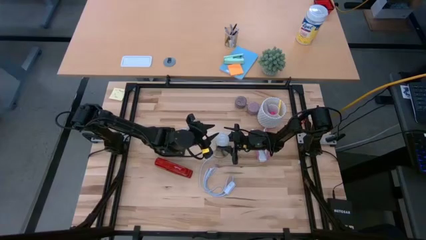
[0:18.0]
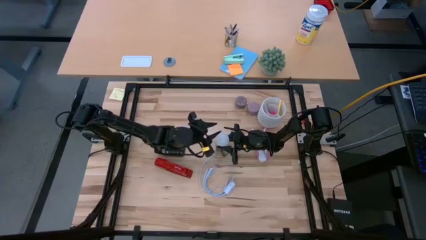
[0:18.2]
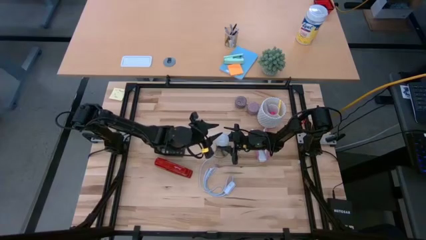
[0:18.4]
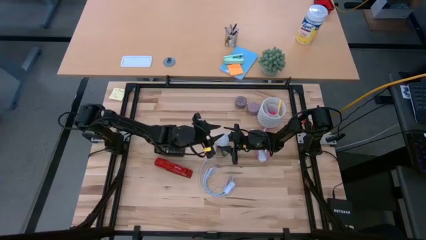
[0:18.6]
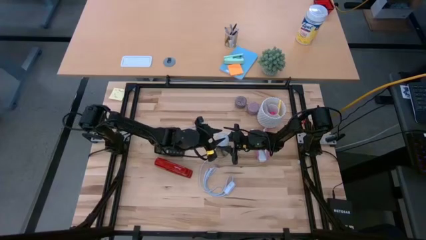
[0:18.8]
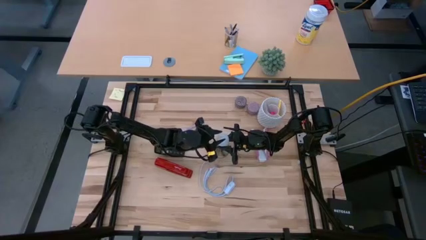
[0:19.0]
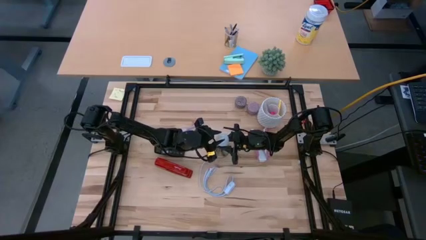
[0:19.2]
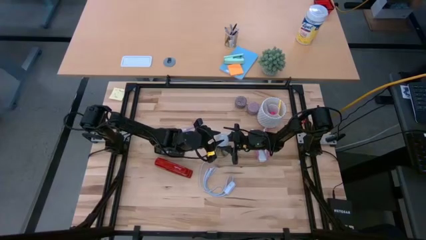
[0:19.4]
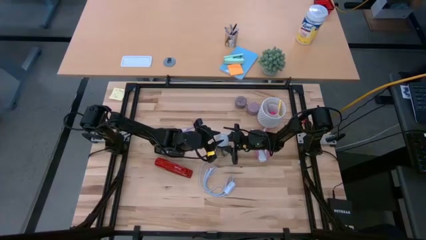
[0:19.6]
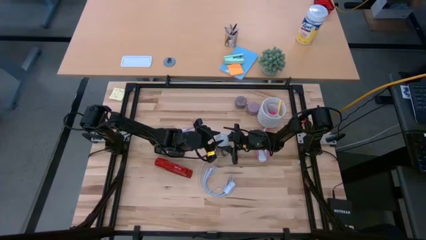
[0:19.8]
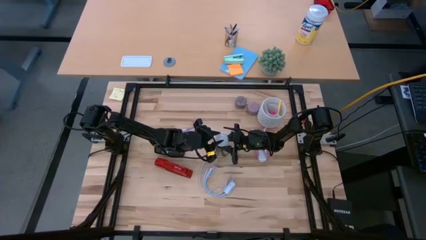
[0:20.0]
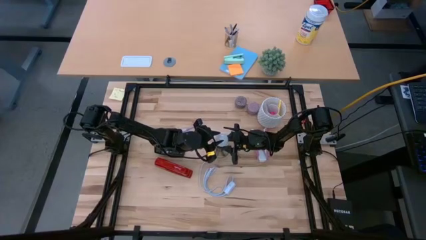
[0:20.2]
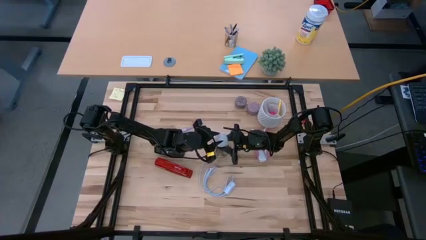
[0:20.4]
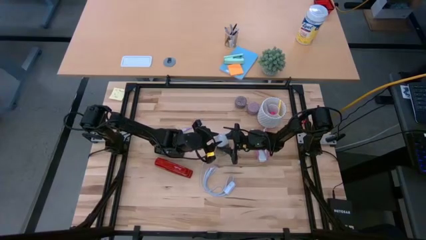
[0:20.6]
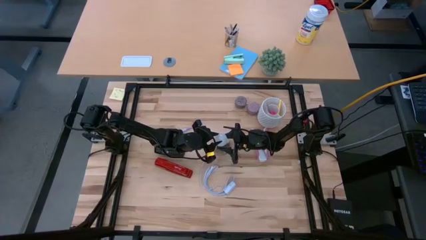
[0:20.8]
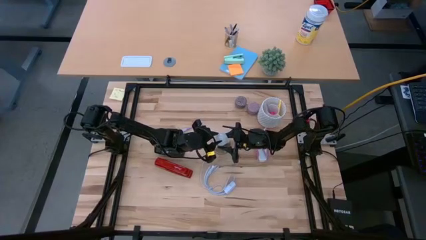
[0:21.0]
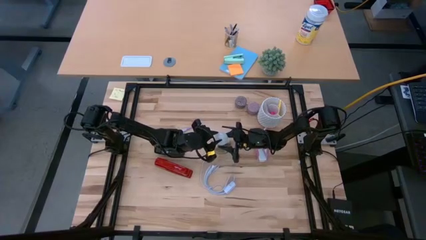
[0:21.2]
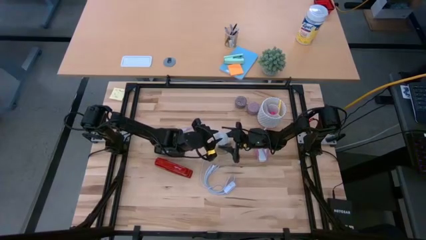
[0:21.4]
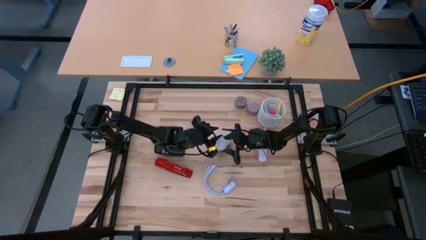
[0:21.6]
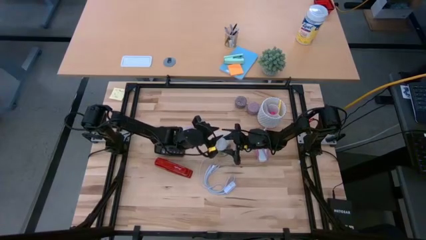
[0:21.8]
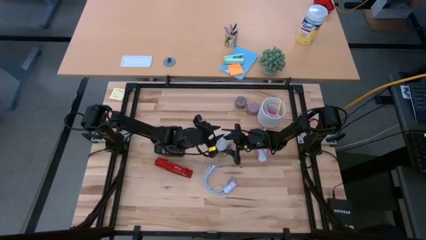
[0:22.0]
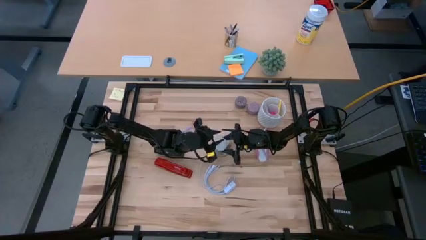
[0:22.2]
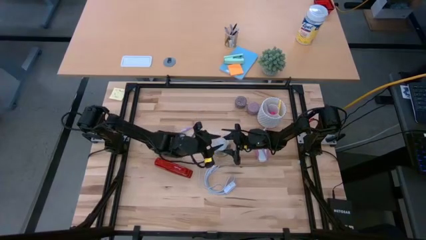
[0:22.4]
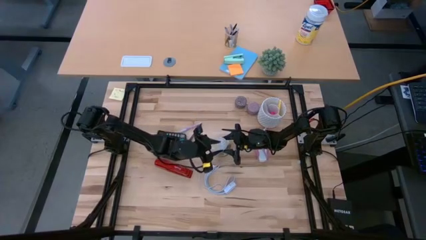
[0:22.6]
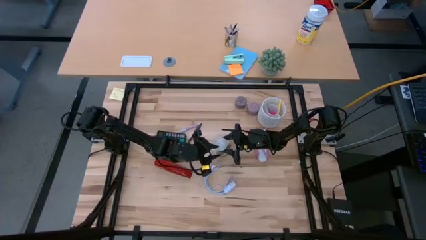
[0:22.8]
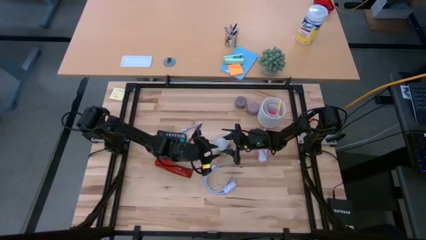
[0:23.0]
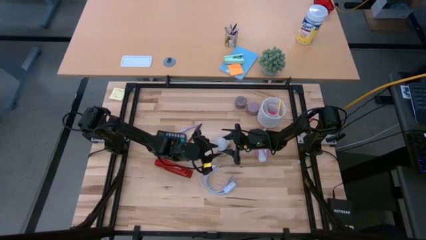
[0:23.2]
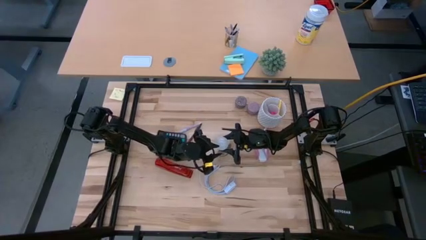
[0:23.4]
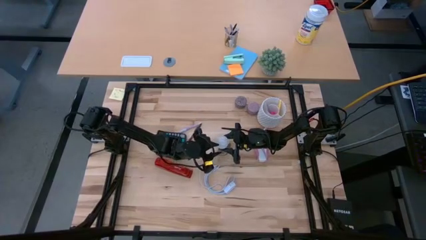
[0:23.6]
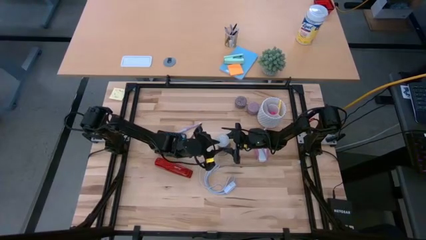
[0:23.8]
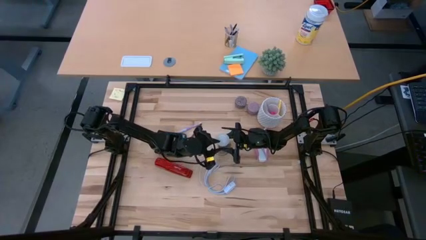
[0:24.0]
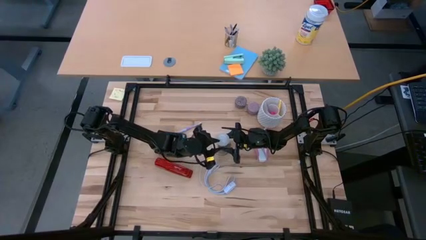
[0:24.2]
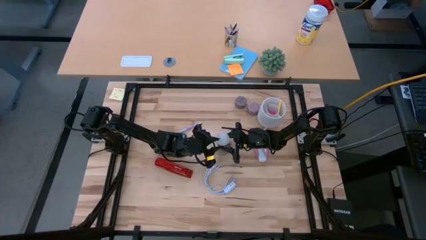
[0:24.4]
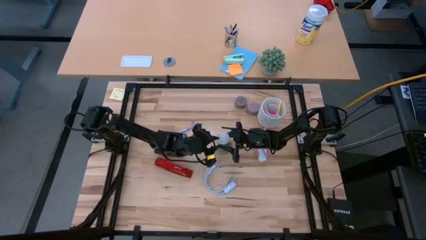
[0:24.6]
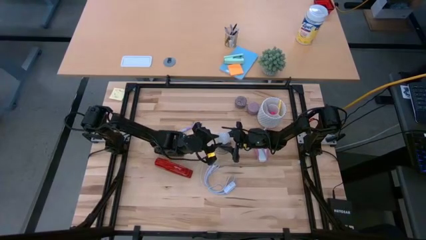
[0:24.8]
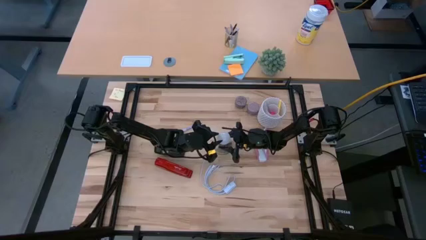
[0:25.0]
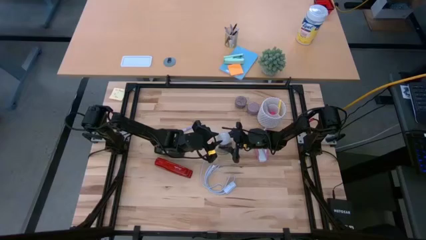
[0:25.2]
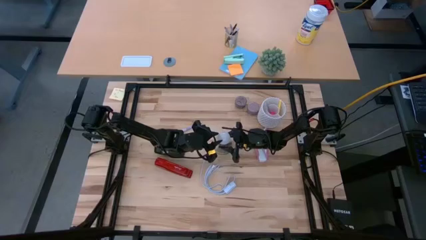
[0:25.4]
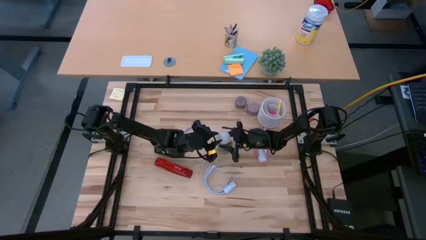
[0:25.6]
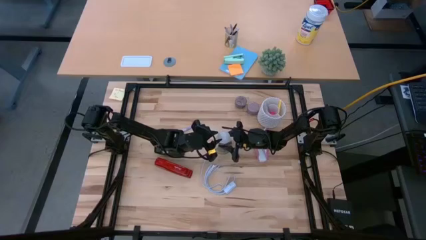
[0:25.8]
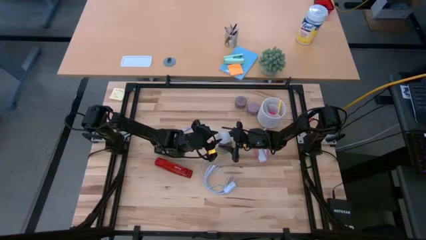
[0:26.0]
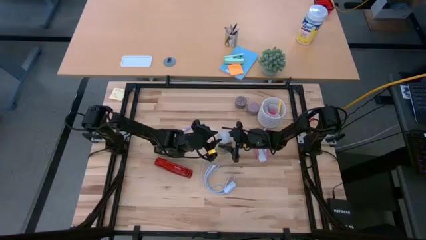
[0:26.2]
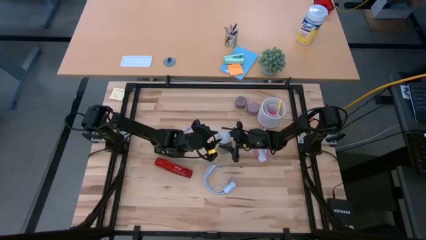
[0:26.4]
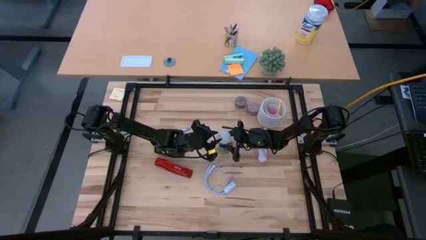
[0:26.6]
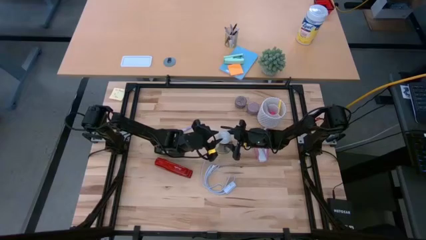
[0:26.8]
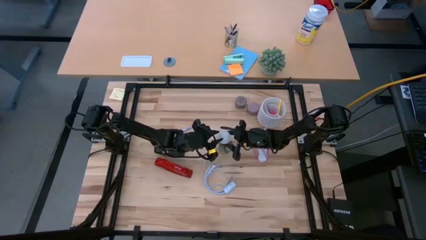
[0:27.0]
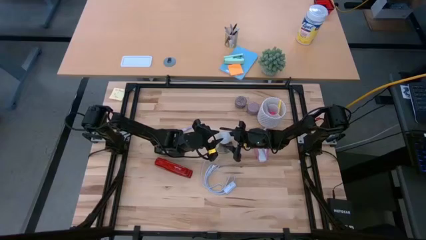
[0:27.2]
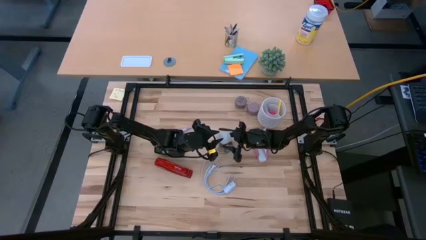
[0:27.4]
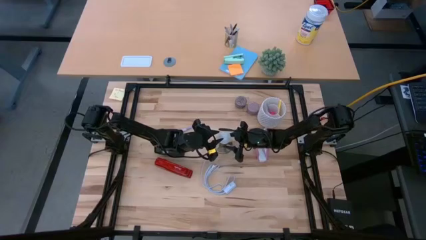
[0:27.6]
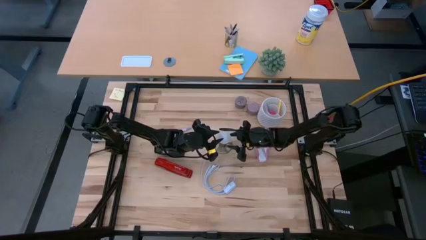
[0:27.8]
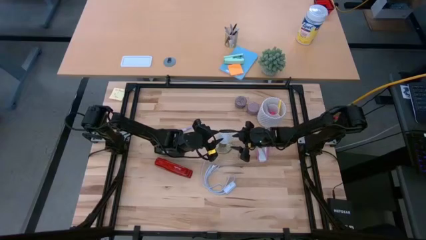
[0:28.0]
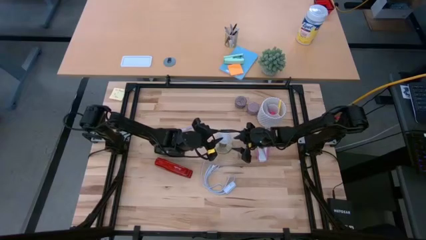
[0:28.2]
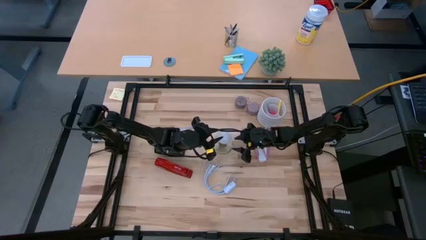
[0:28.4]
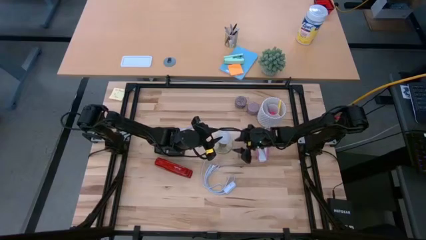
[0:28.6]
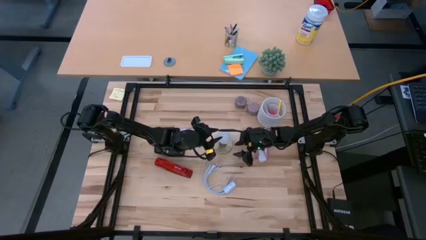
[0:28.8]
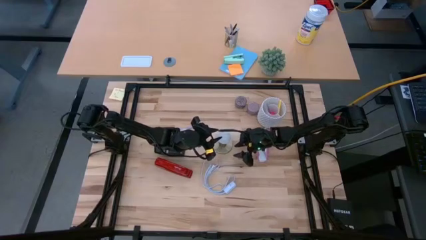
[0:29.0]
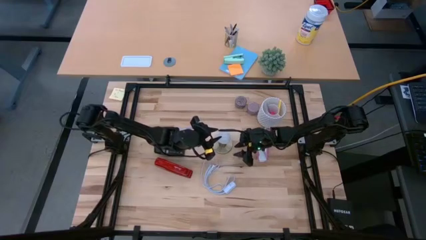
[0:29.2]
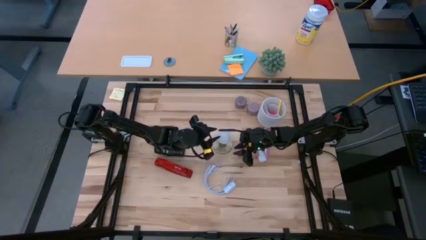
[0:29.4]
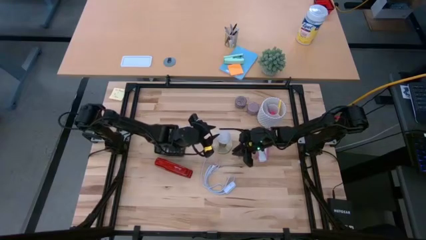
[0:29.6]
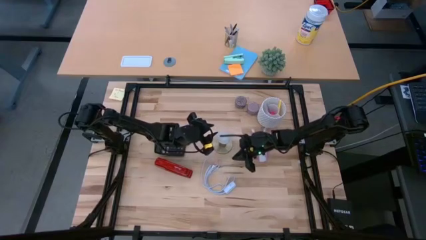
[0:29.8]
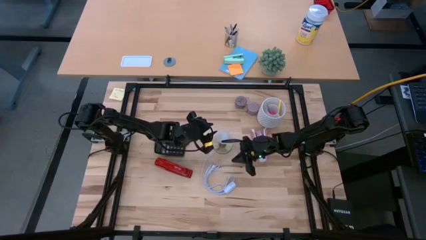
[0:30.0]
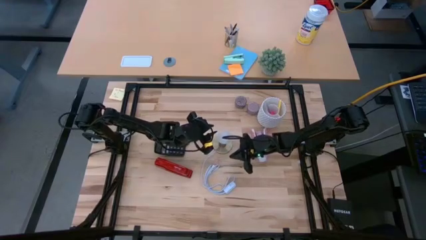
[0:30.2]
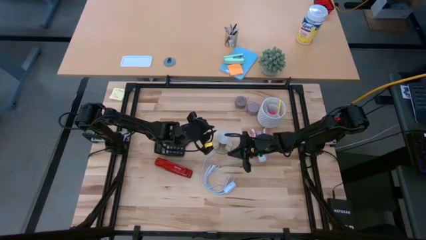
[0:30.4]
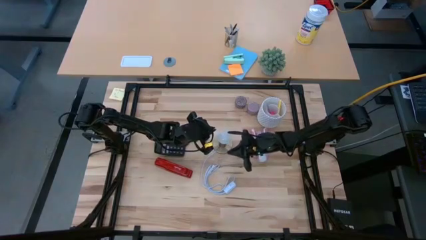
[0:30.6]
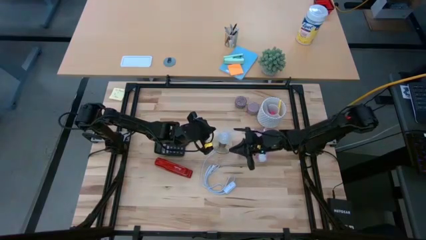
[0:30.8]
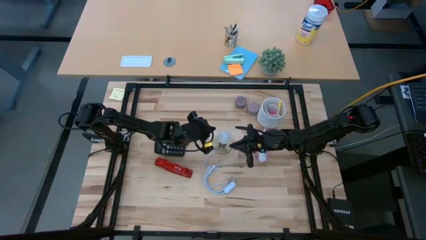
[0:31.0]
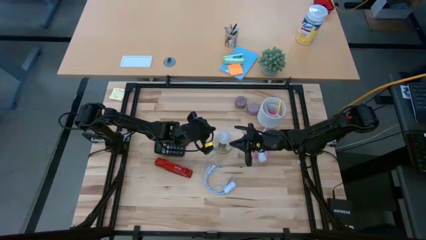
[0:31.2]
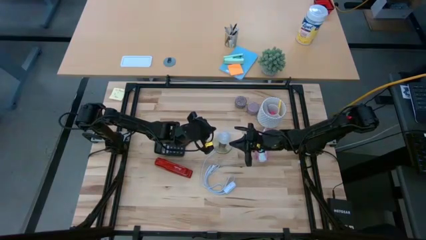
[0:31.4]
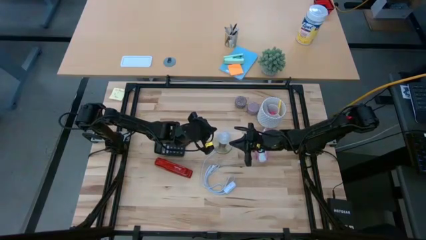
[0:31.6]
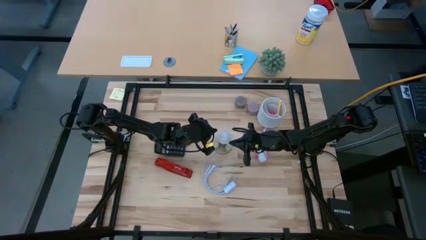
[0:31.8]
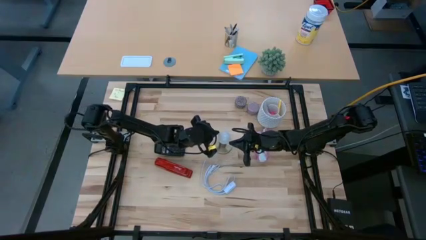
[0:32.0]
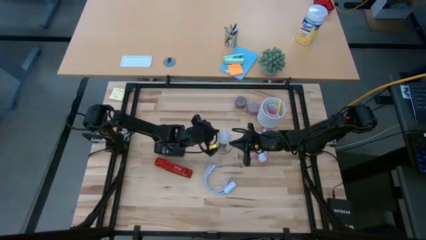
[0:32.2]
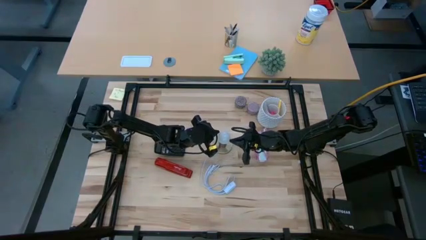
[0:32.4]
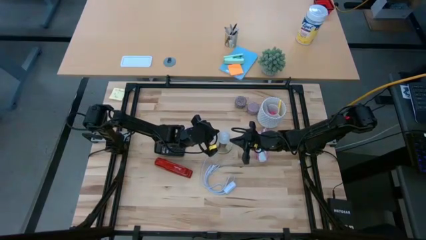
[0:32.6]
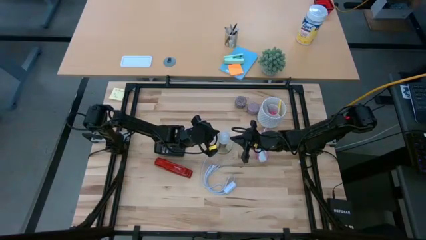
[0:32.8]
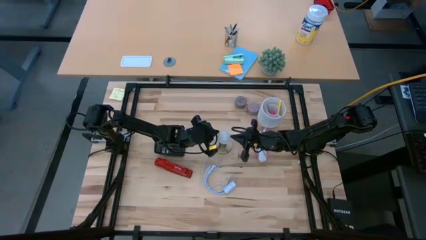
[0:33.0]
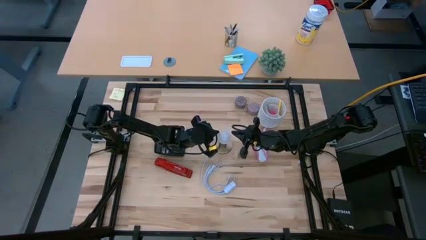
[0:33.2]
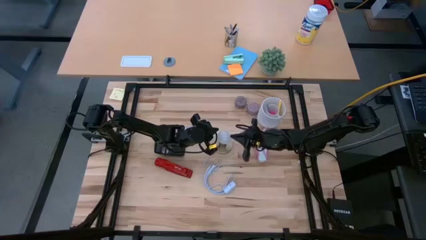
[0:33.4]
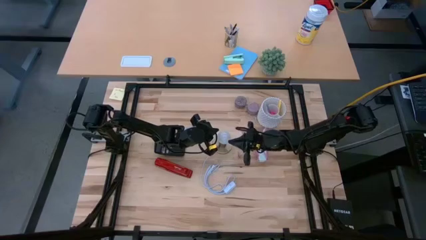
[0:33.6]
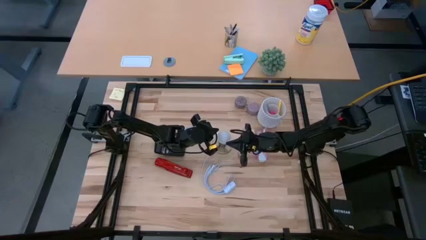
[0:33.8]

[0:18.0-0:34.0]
Task: Screw lightbulb
Insert the white lightbulb into the golden lamp
